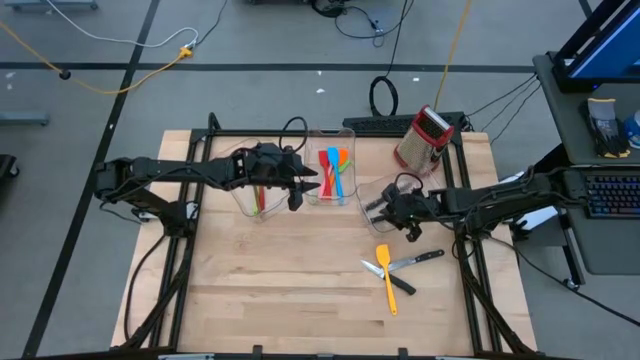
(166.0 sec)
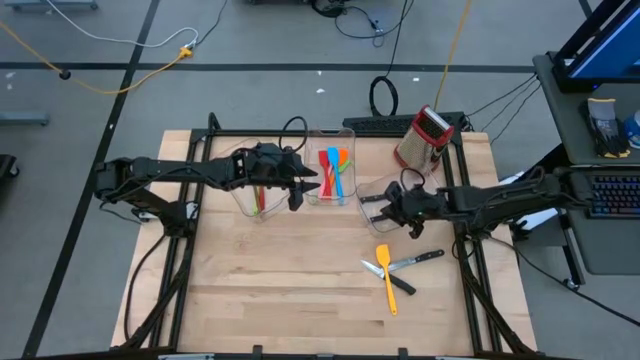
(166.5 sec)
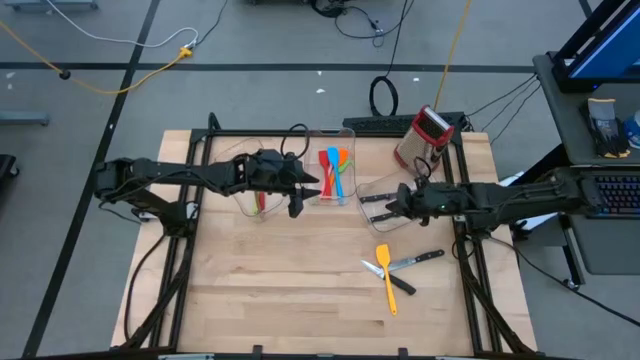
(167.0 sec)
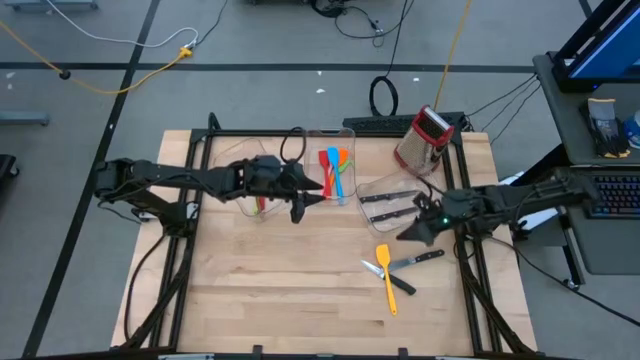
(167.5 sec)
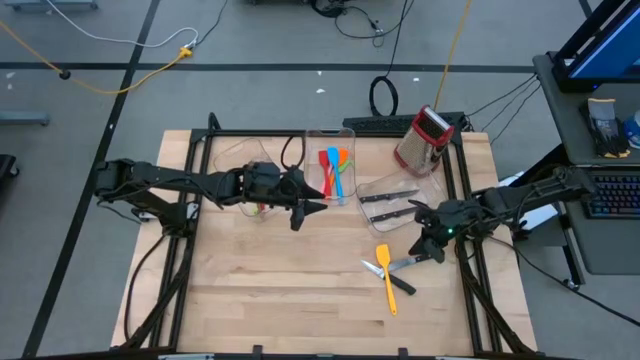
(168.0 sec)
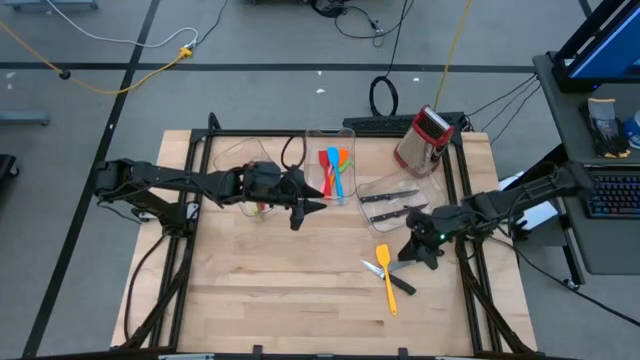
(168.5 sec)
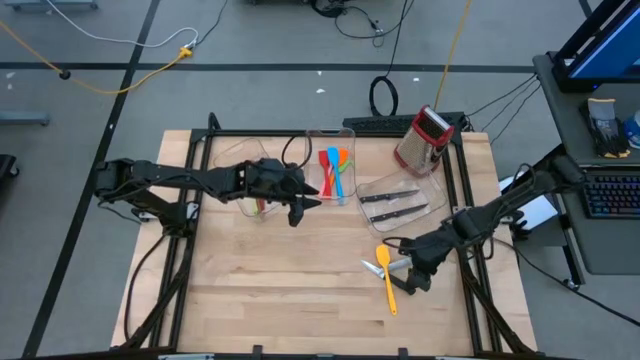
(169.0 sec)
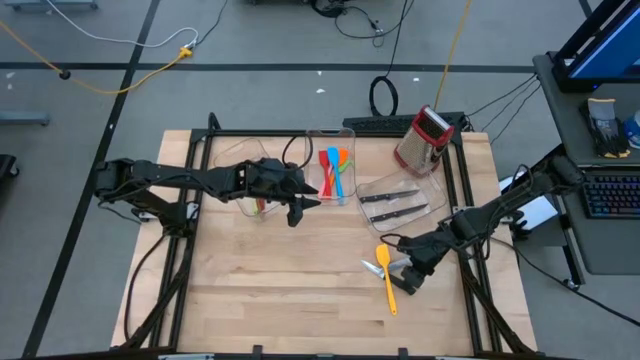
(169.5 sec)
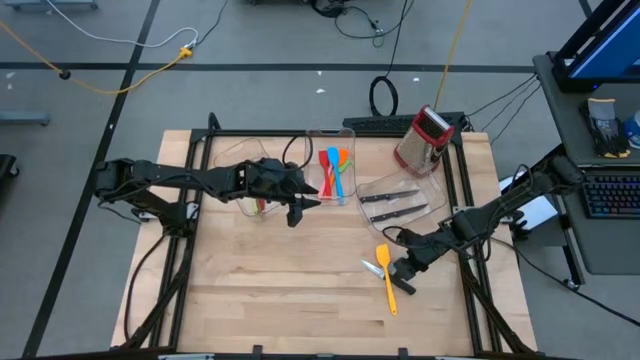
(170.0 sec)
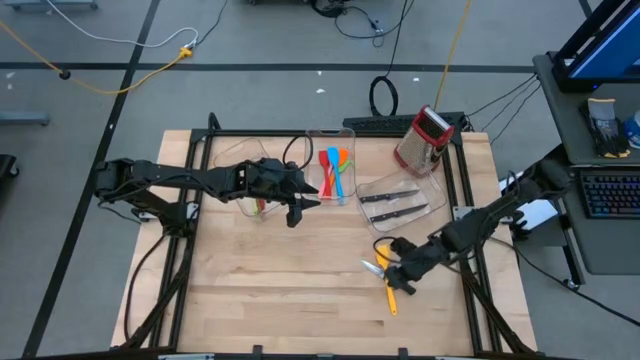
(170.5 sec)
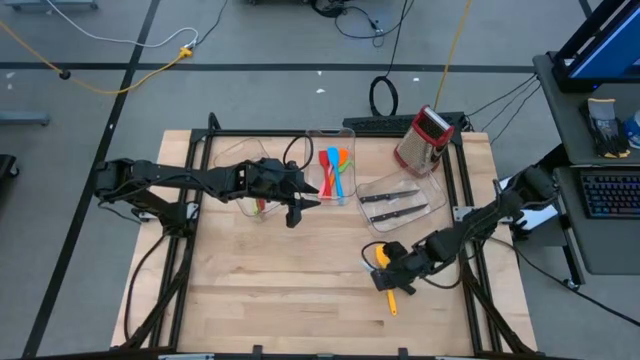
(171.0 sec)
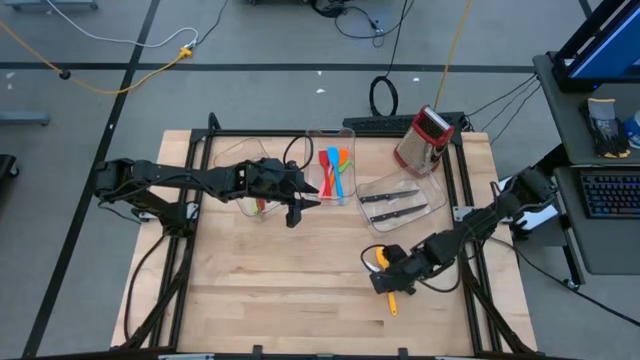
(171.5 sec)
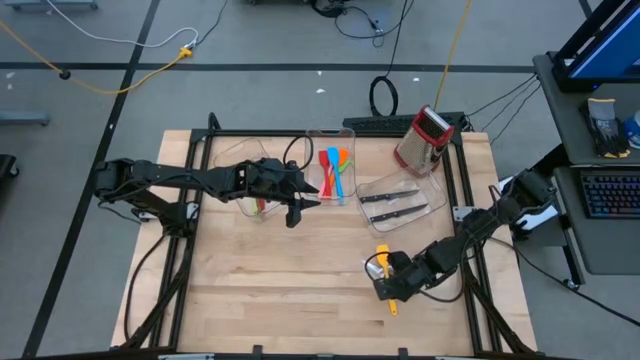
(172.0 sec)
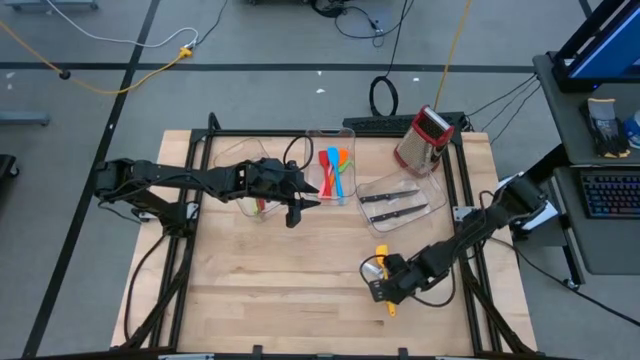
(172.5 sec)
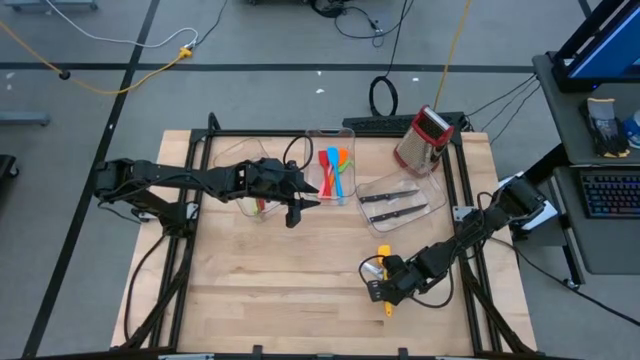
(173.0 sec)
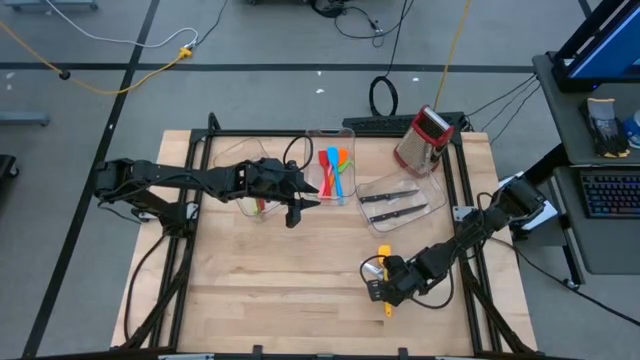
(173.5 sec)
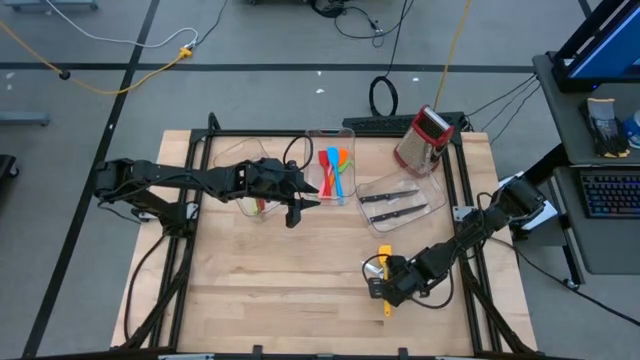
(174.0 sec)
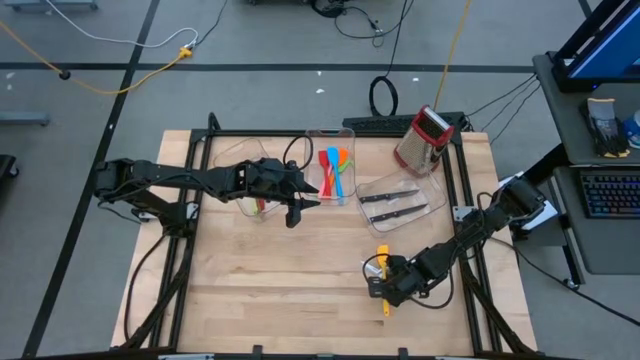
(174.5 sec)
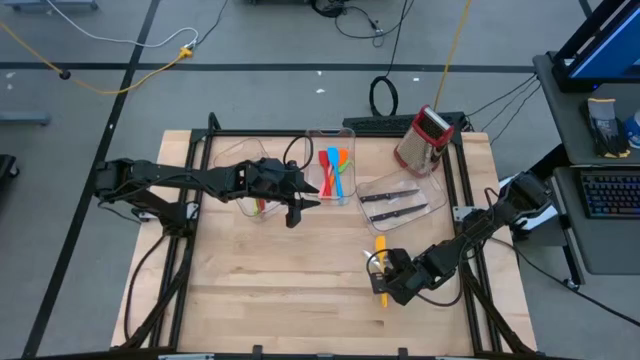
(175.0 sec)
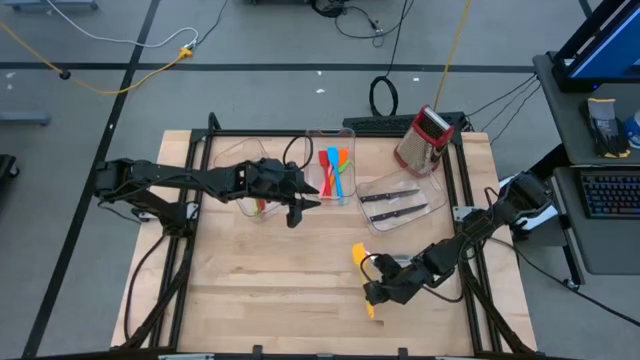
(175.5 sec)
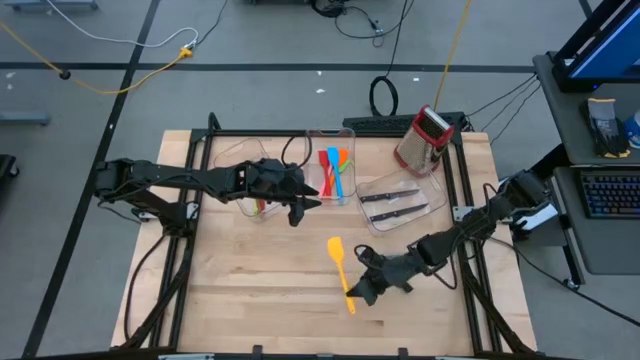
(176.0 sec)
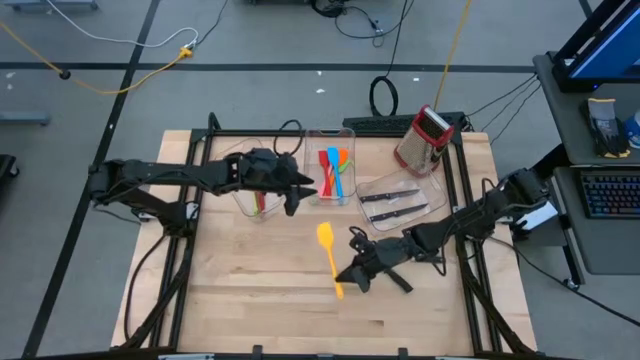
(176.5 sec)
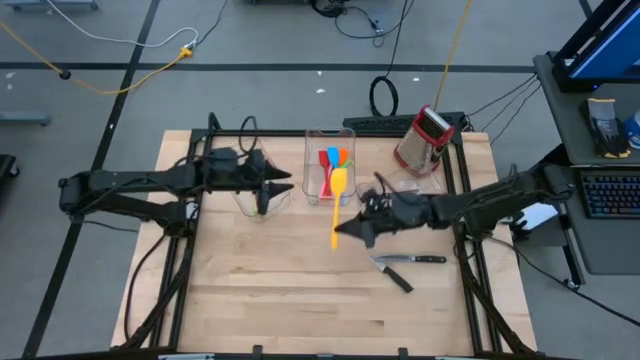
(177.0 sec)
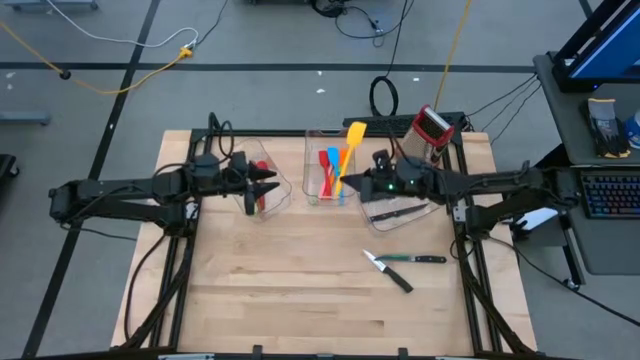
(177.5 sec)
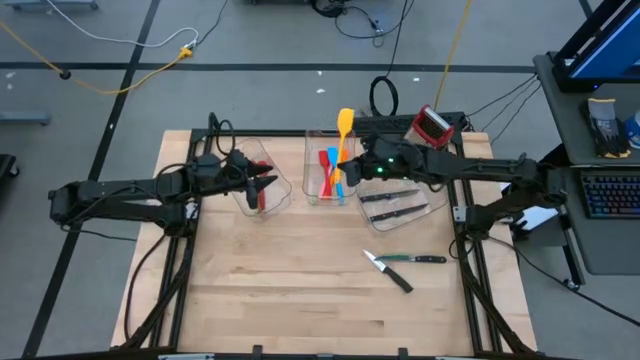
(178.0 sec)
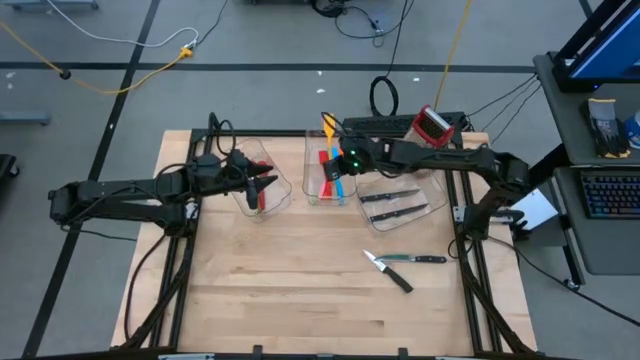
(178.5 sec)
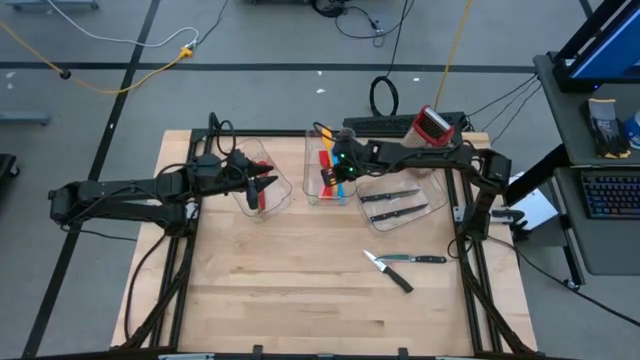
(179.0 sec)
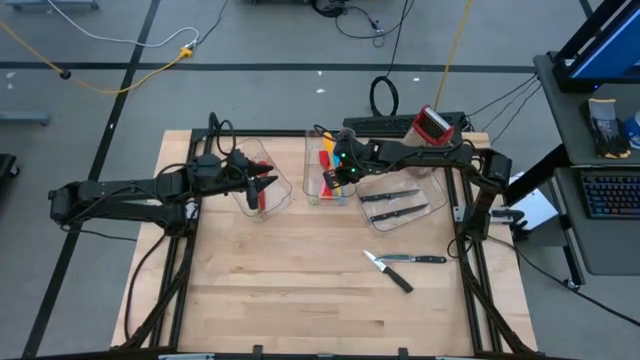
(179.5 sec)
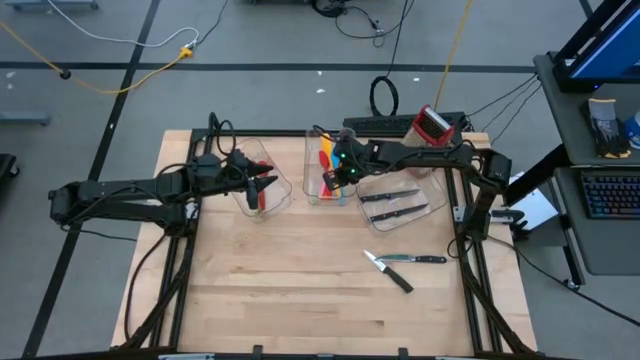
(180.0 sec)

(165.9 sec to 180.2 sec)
Task: Pick & Place Kitchen Items
Put the yellow spatula into the middle bin

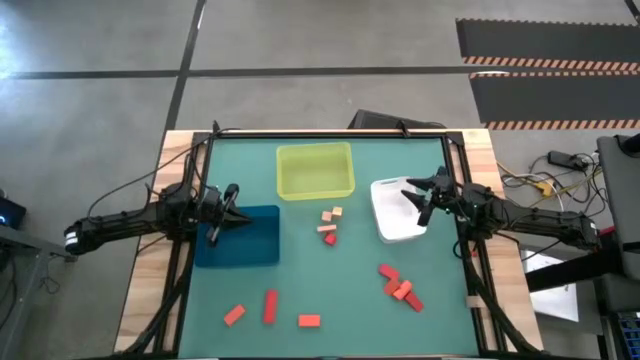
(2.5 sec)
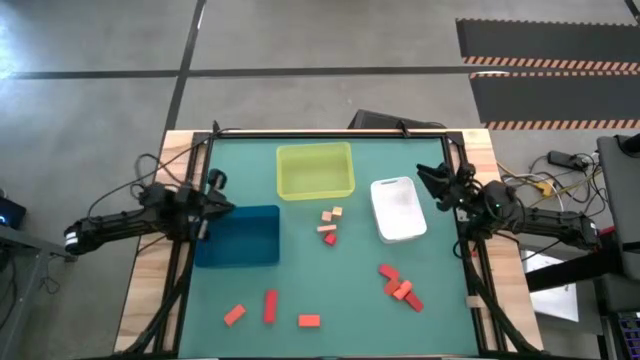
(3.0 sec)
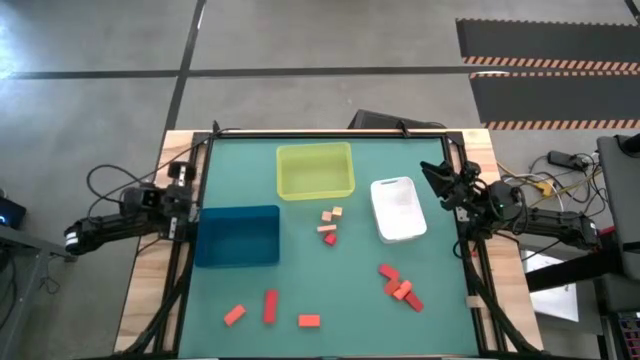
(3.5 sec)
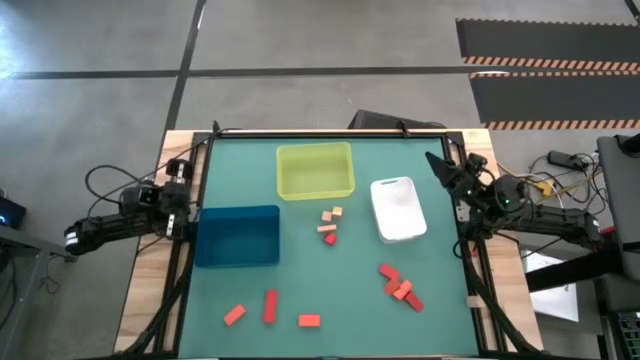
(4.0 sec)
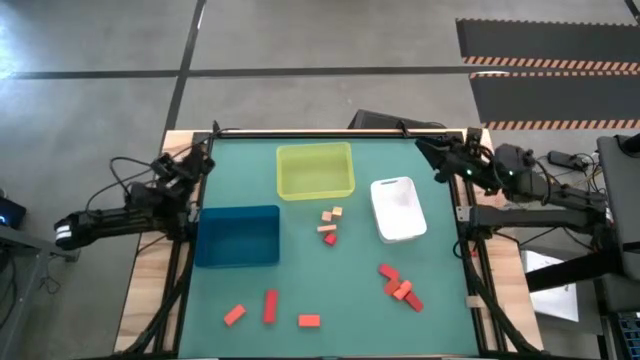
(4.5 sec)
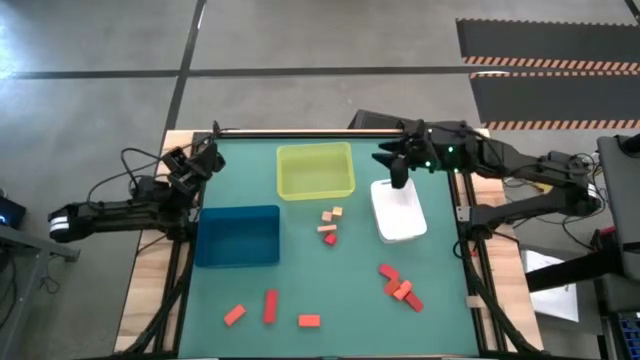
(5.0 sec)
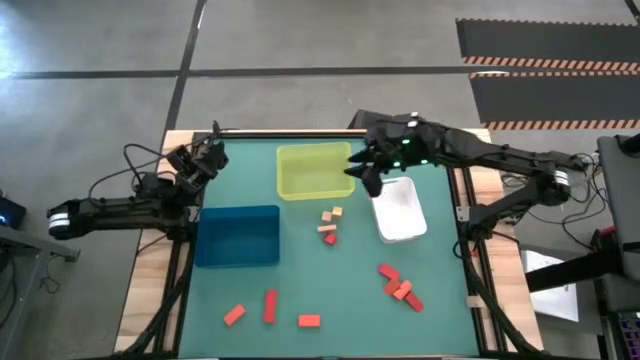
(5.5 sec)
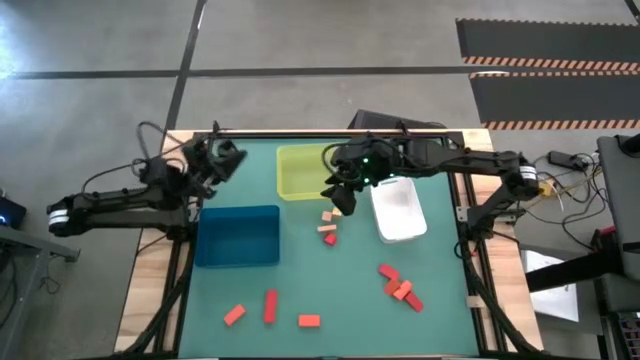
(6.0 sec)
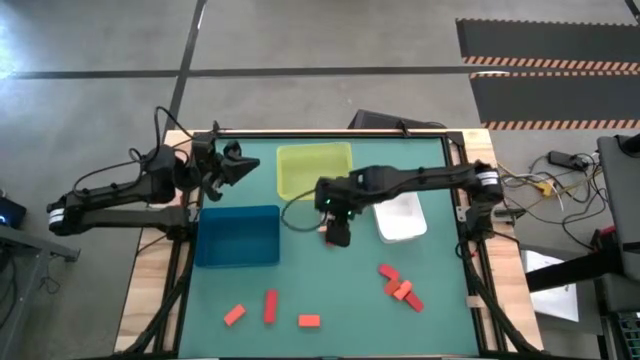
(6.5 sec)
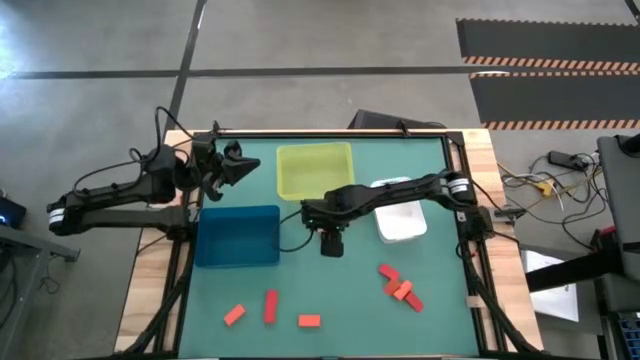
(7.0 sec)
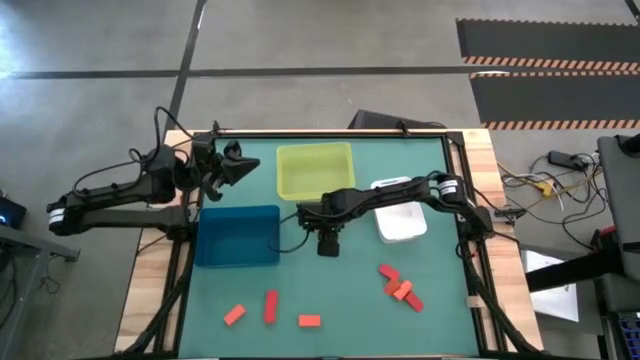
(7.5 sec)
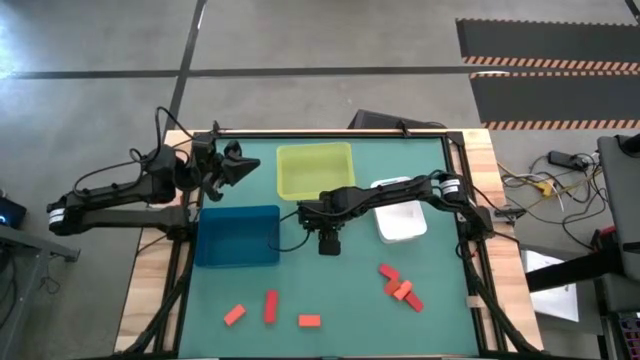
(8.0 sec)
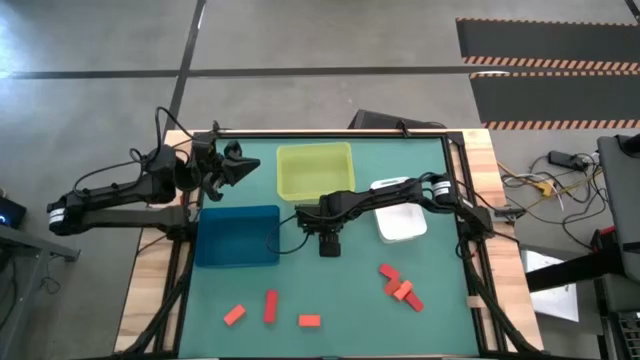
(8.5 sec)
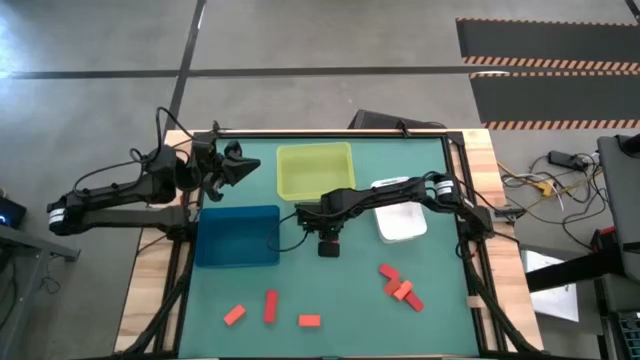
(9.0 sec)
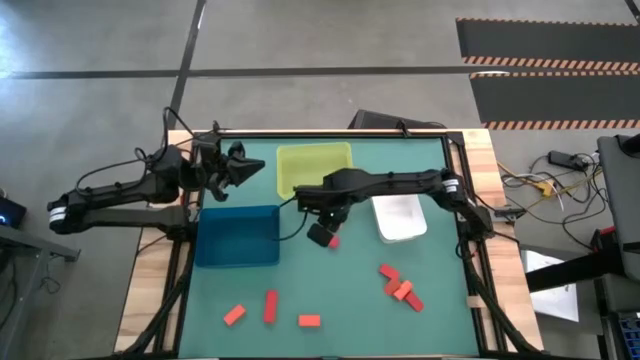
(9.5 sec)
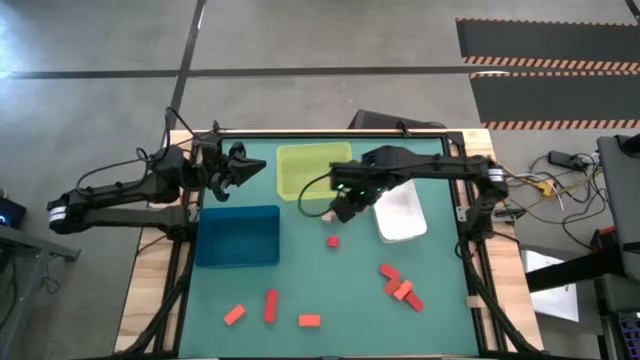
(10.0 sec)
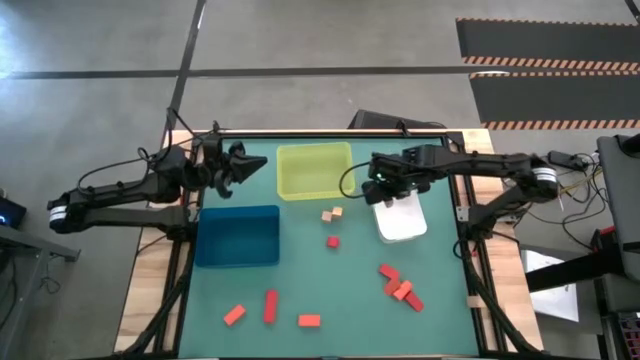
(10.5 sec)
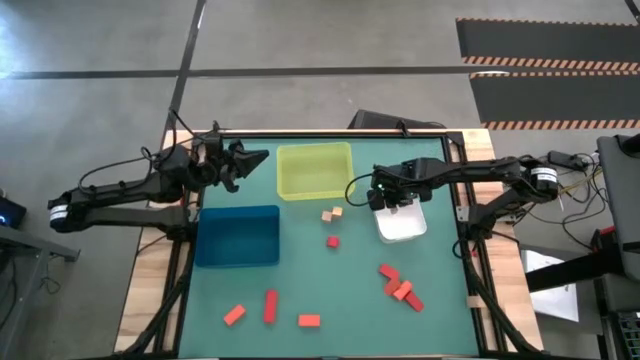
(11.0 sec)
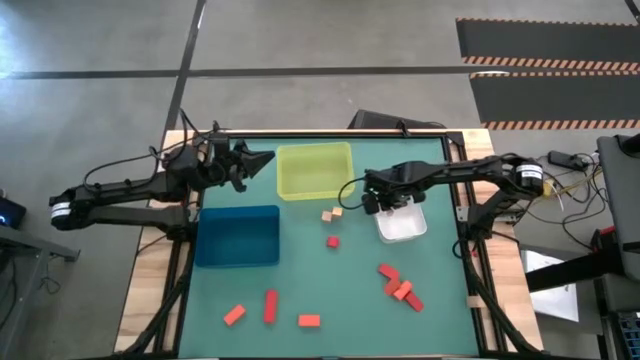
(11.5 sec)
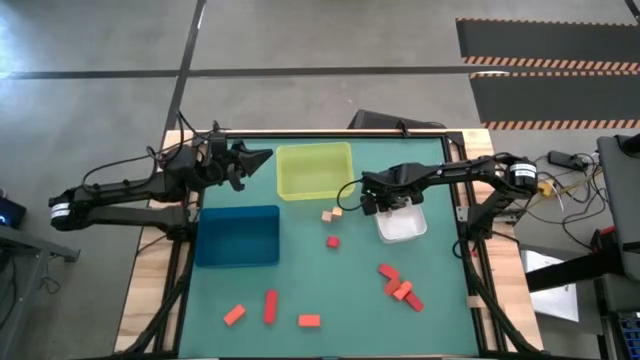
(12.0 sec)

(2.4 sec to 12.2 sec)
Task: Sort & place blocks by color
Put the brown block into the white bin
